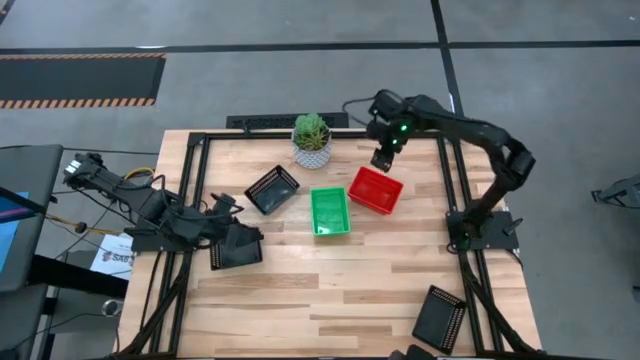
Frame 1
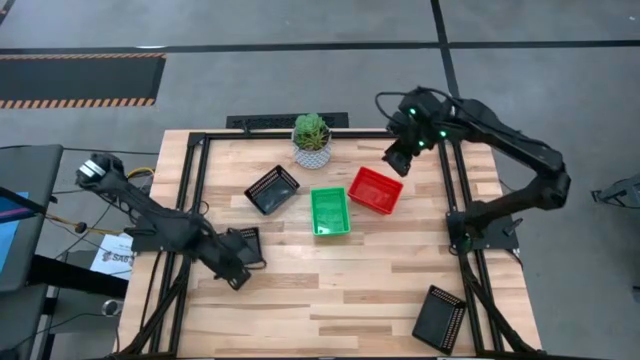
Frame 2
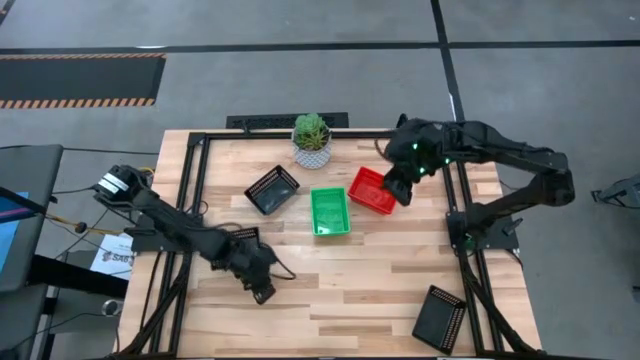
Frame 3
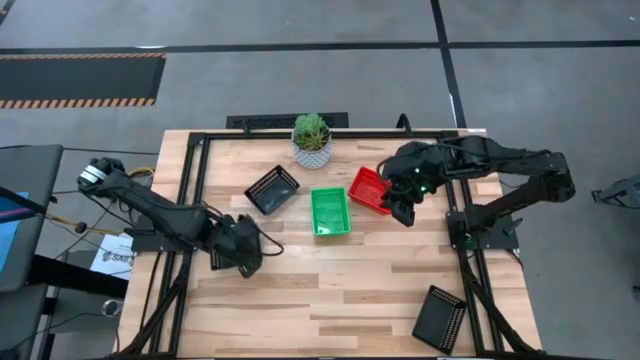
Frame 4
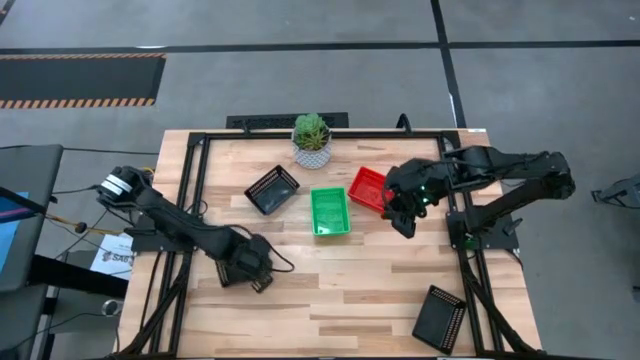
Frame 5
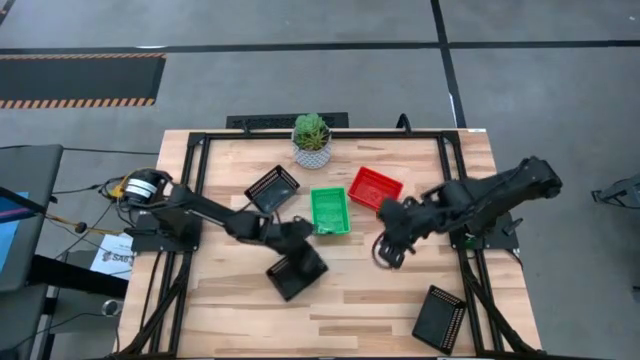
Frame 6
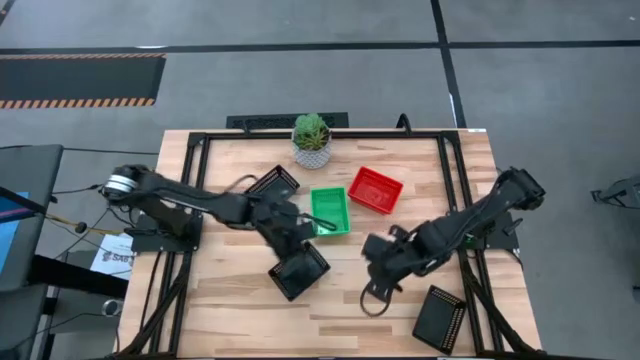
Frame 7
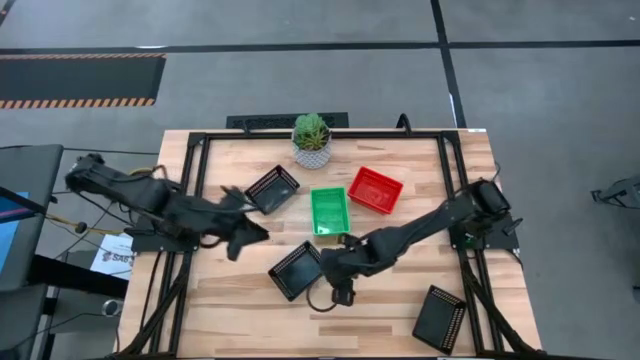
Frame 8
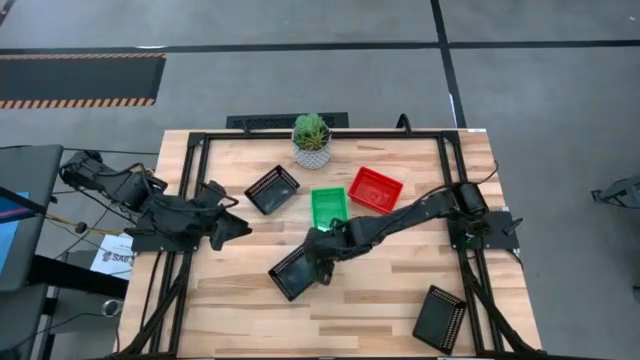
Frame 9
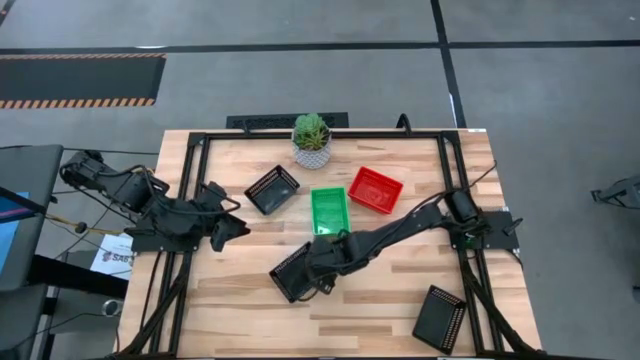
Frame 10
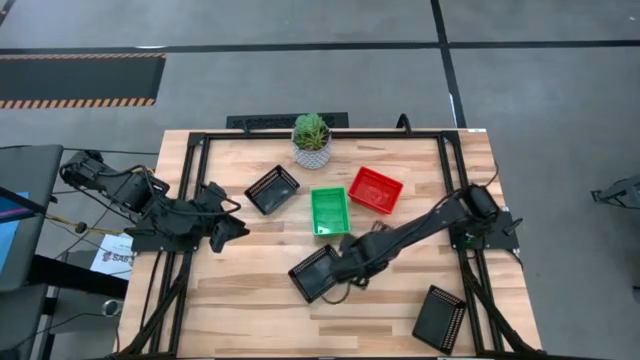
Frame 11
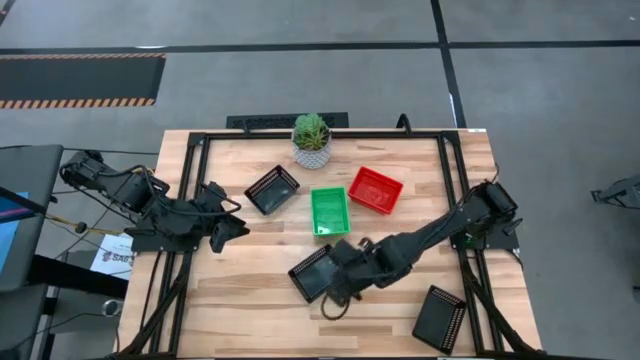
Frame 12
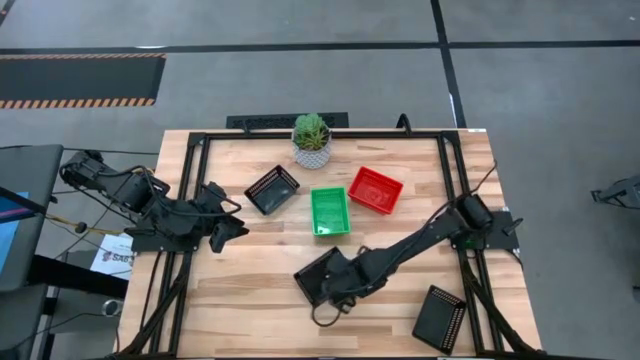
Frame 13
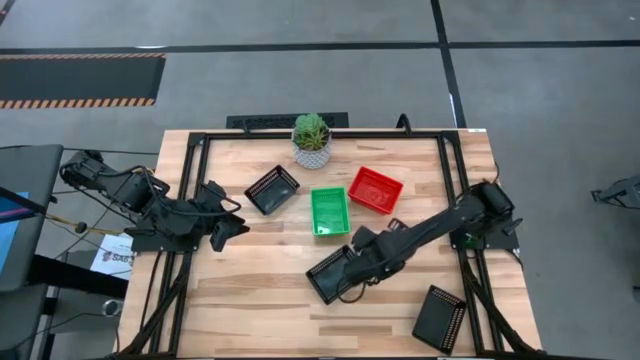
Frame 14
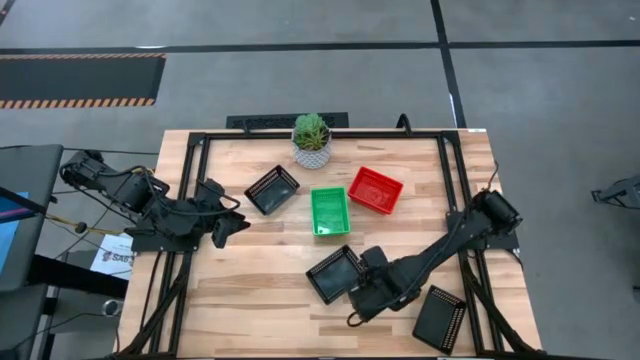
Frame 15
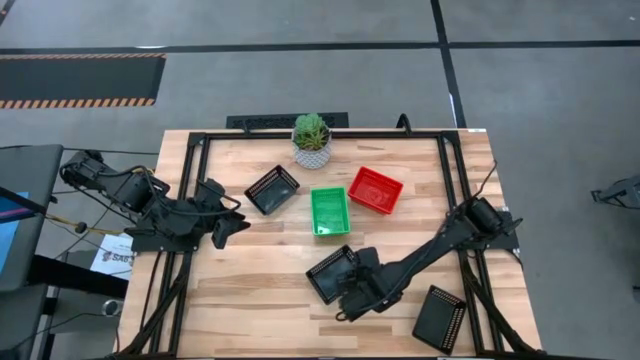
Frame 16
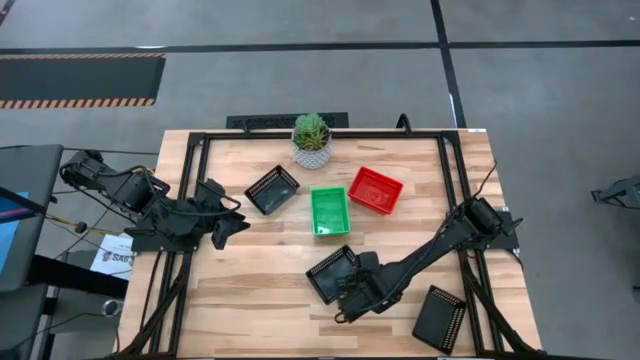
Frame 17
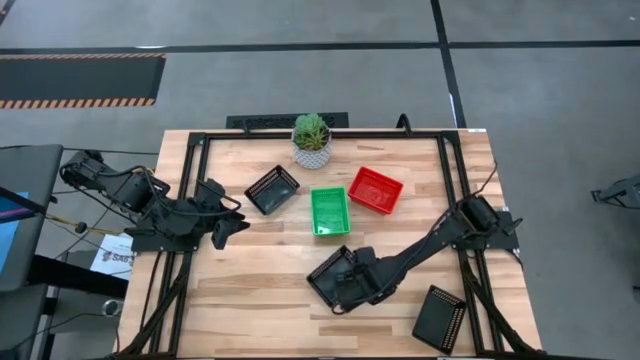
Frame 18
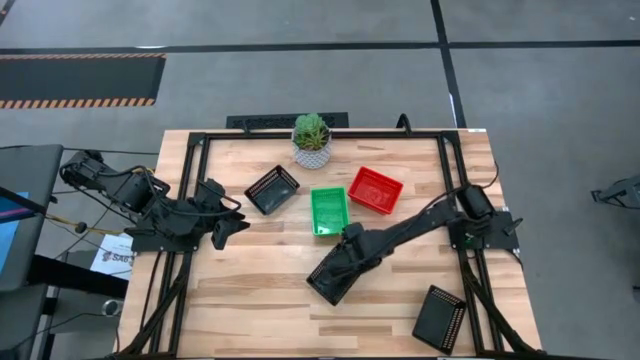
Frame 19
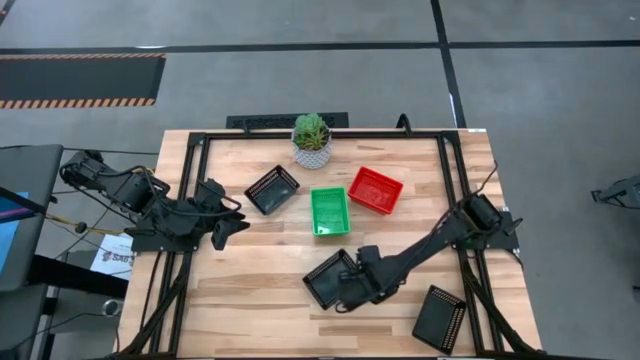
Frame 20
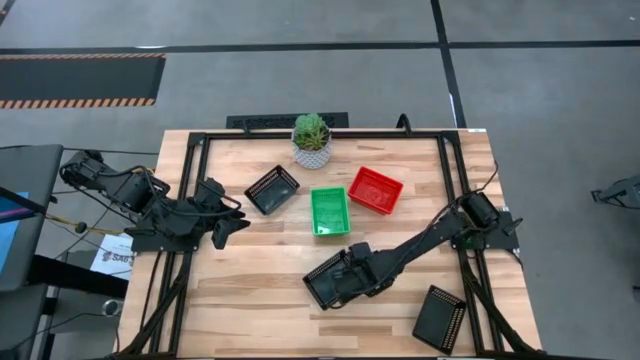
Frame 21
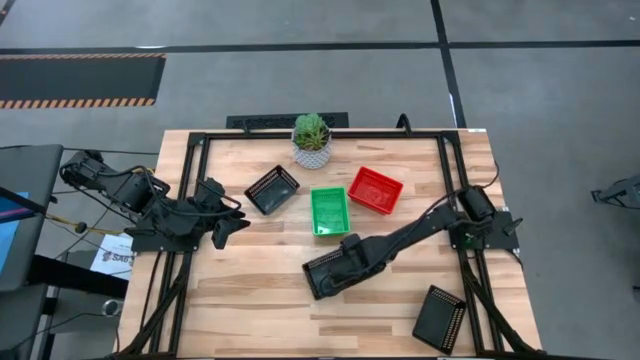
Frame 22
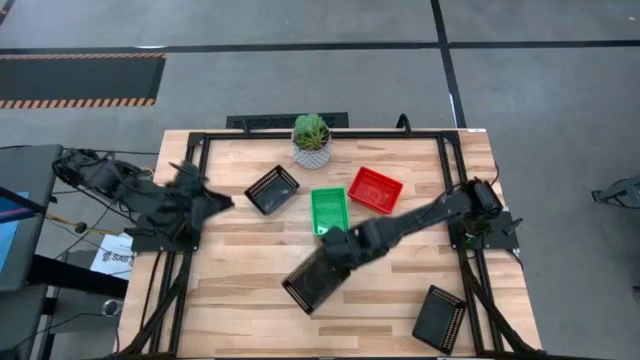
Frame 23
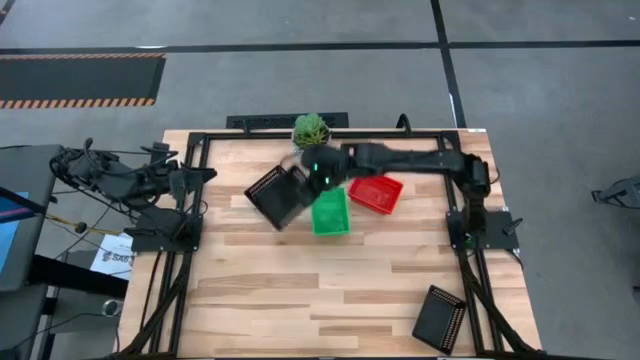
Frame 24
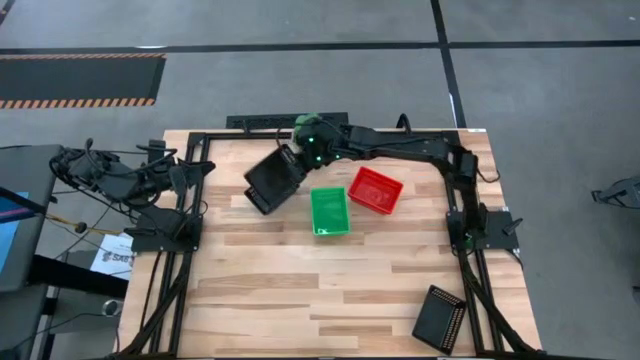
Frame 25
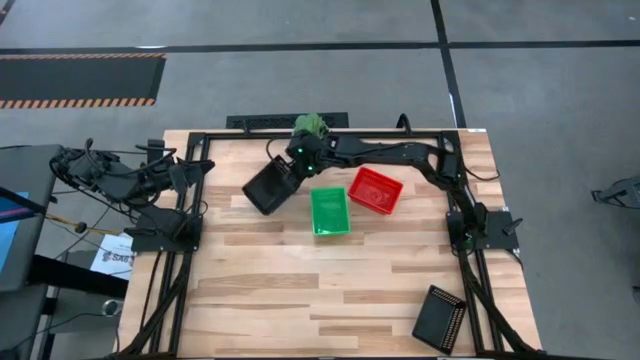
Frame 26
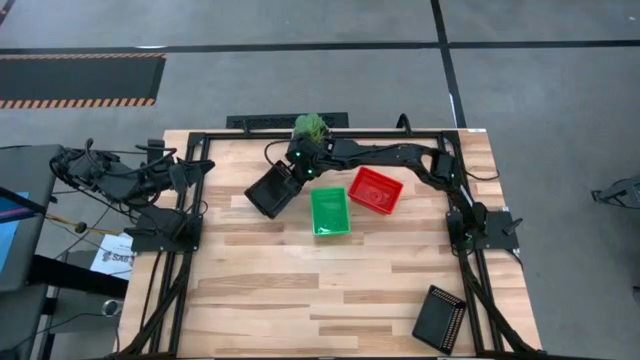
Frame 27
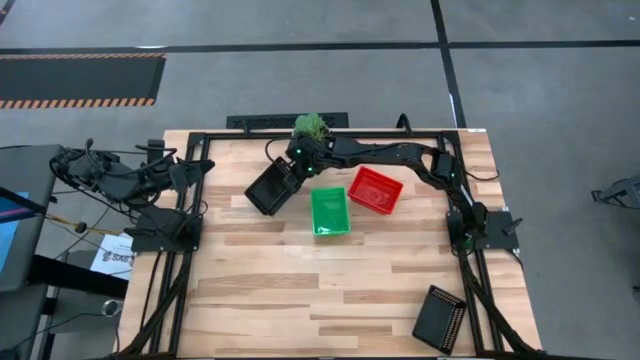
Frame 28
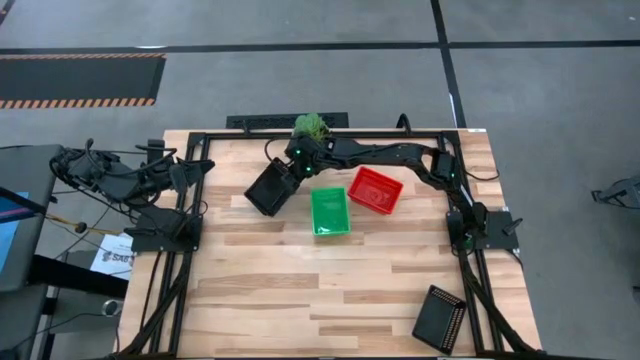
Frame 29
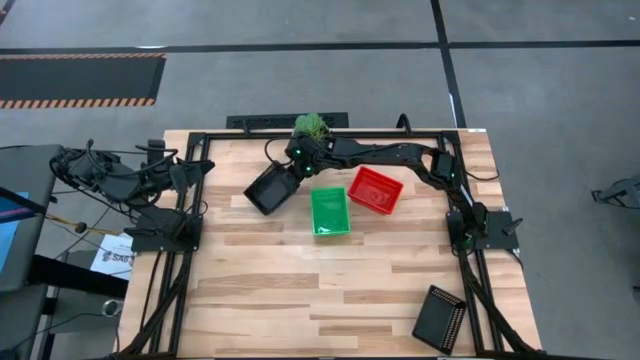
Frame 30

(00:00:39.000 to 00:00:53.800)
Stack the middle black bin on the top black bin

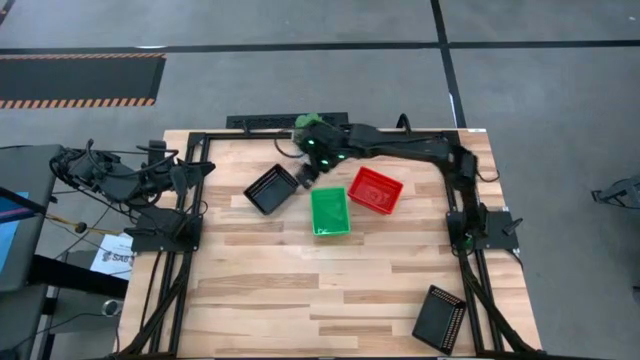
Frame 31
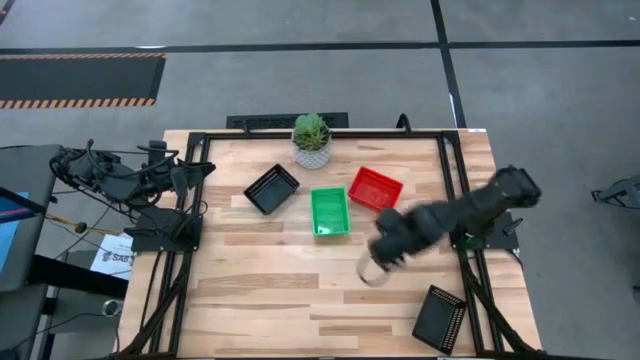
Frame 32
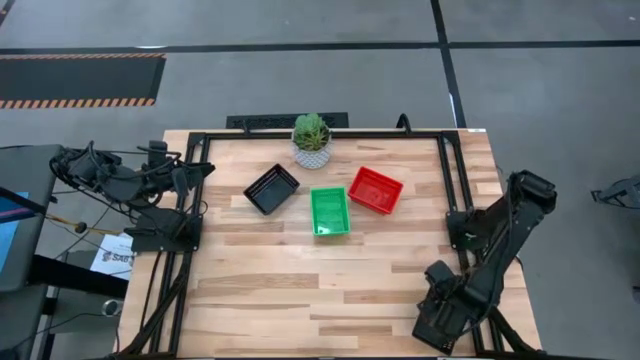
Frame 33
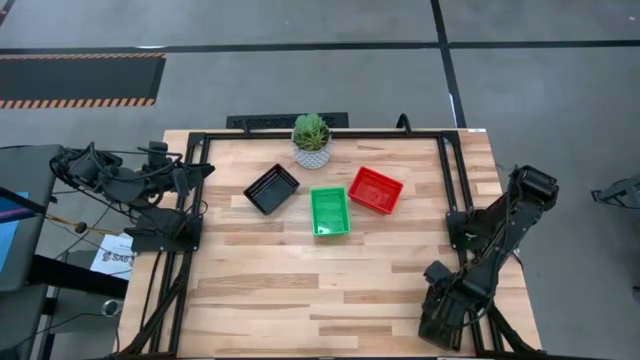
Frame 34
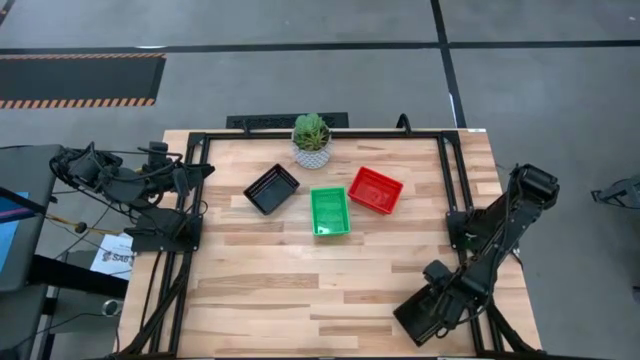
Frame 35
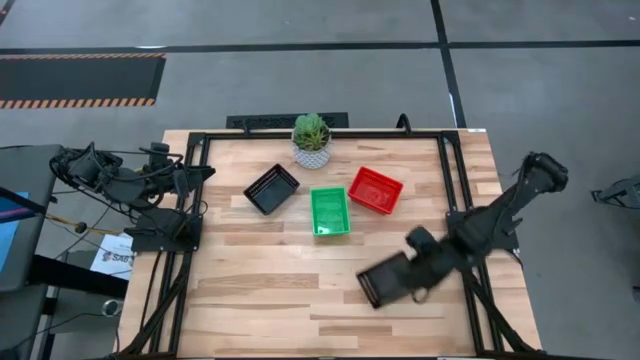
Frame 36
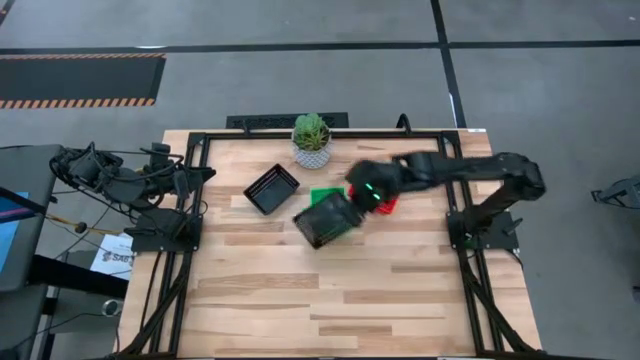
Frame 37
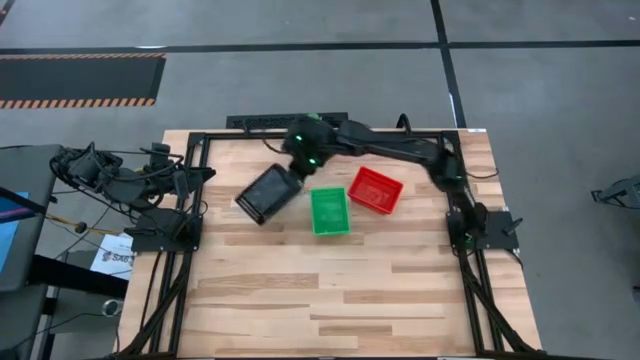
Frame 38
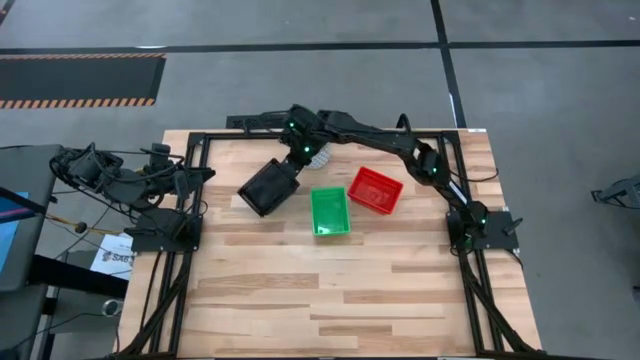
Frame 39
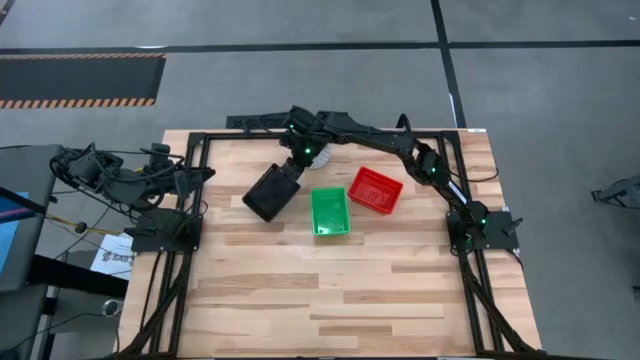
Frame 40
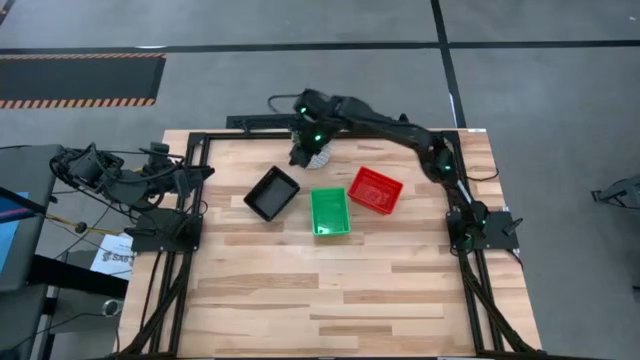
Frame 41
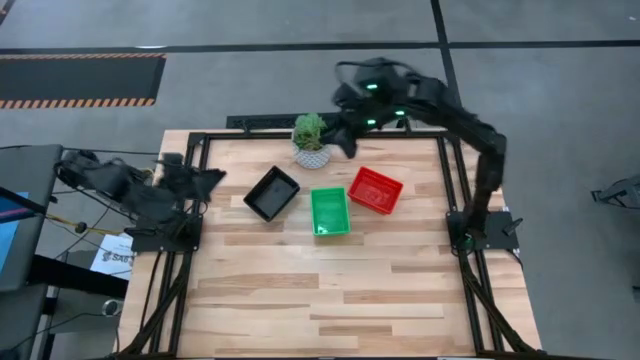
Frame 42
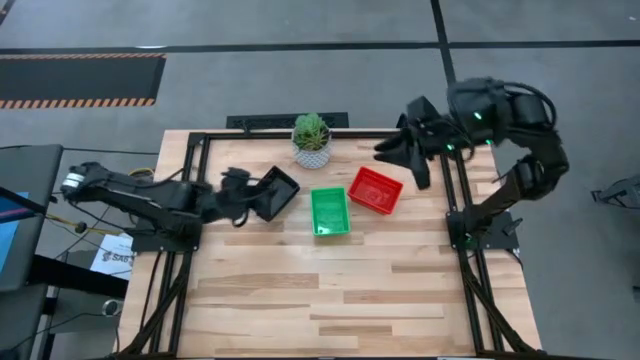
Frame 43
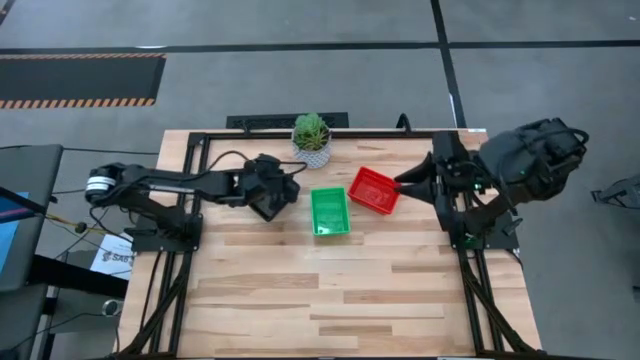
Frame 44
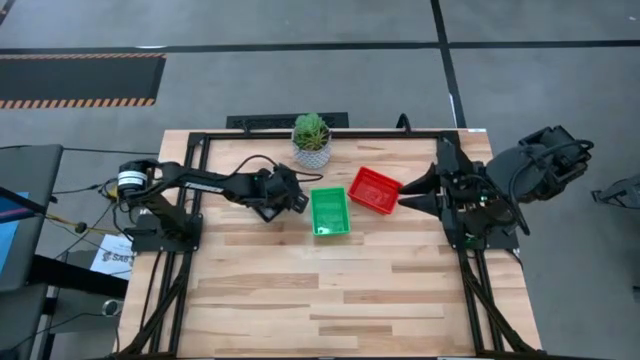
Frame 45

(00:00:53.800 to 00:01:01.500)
Stack the bottom black bin on the top black bin
